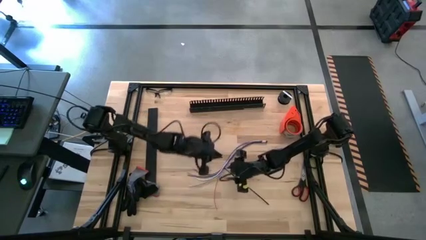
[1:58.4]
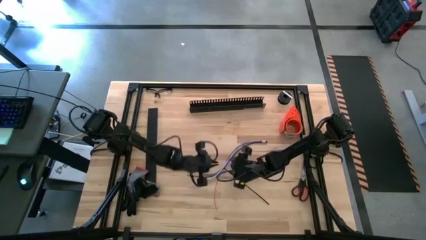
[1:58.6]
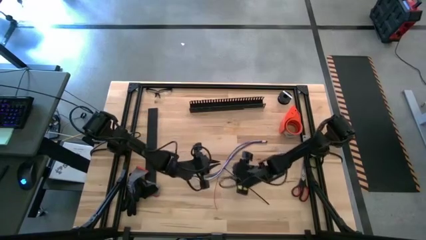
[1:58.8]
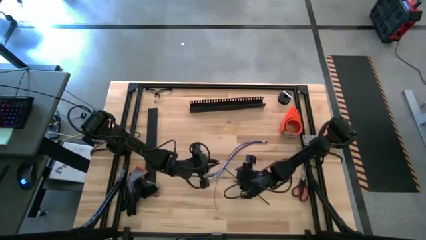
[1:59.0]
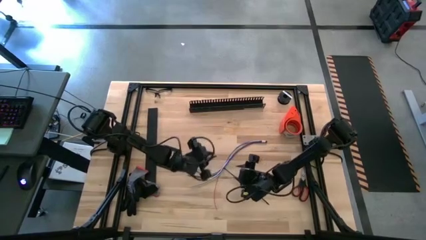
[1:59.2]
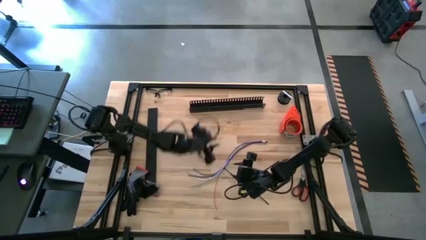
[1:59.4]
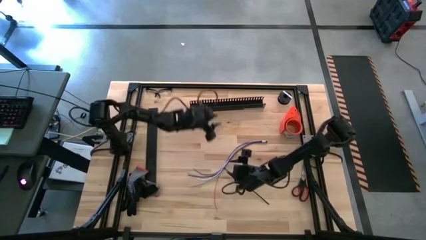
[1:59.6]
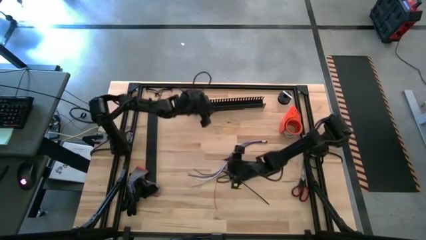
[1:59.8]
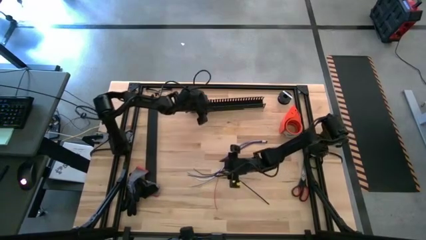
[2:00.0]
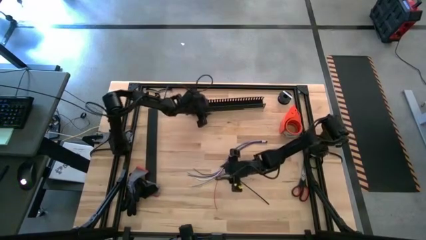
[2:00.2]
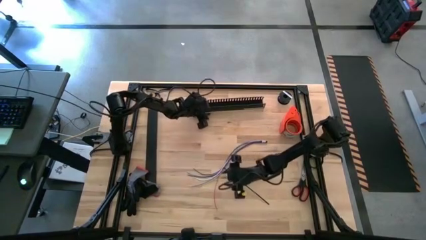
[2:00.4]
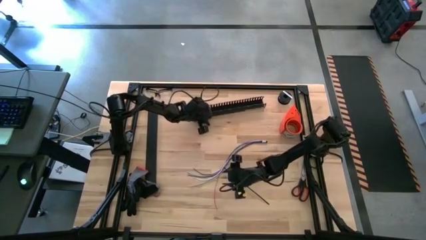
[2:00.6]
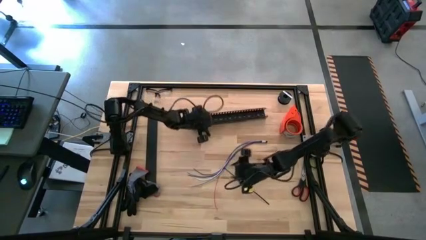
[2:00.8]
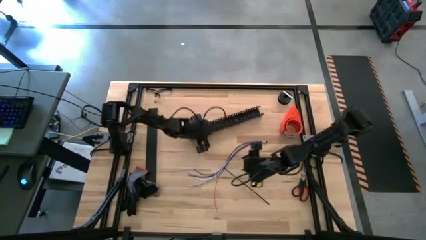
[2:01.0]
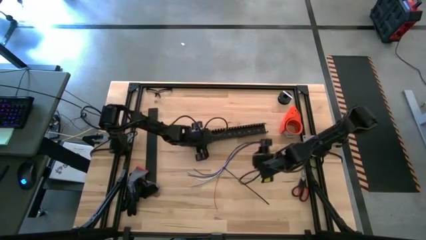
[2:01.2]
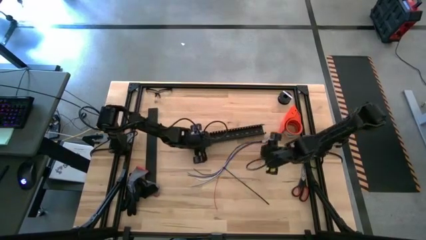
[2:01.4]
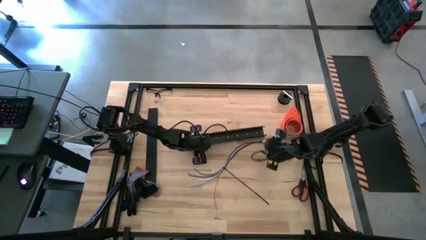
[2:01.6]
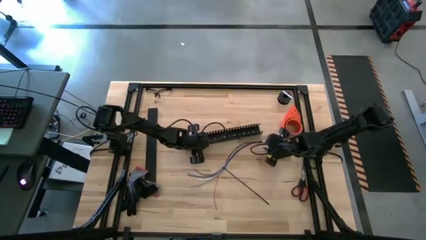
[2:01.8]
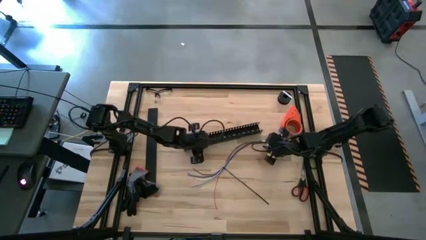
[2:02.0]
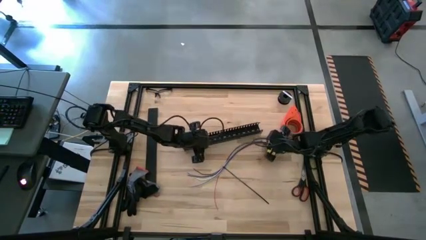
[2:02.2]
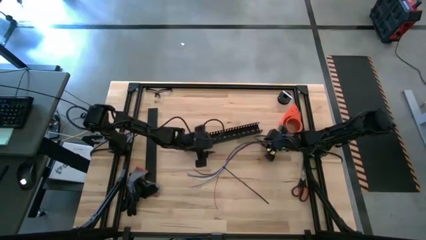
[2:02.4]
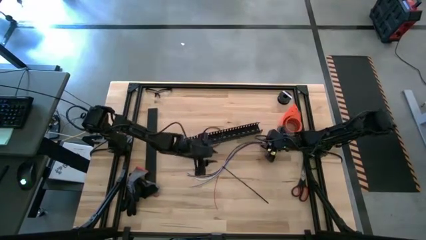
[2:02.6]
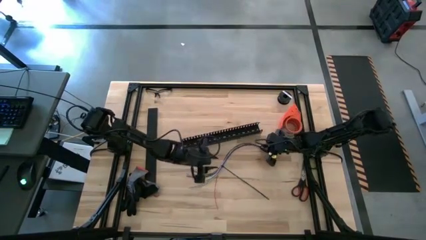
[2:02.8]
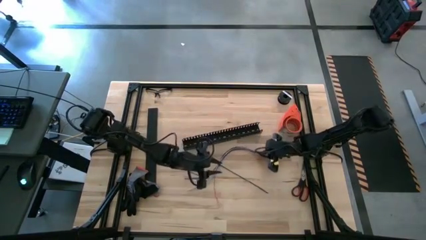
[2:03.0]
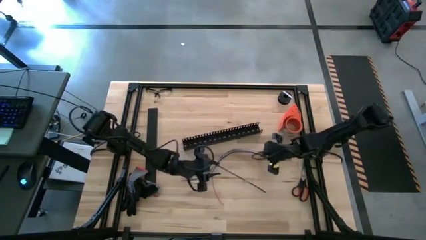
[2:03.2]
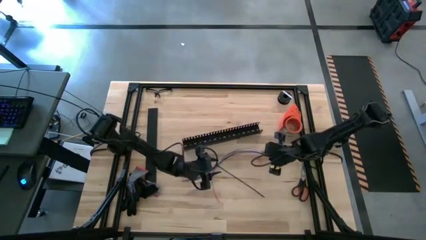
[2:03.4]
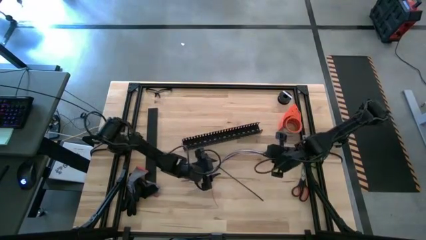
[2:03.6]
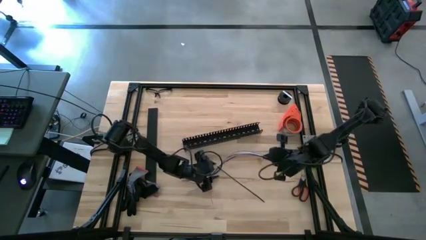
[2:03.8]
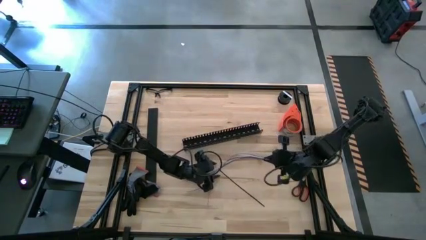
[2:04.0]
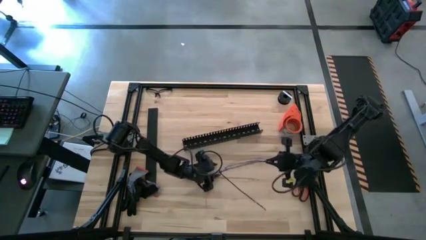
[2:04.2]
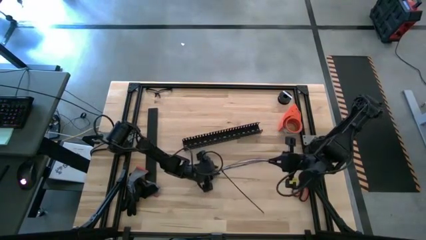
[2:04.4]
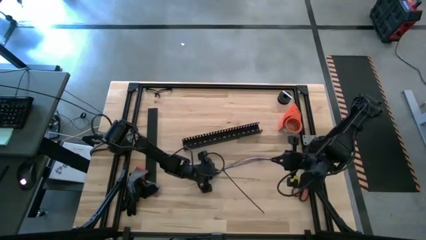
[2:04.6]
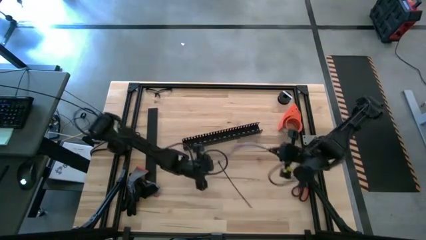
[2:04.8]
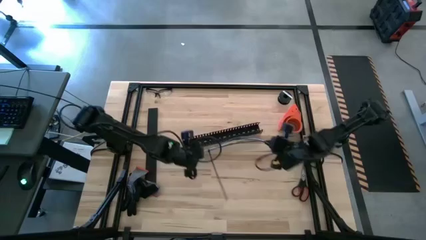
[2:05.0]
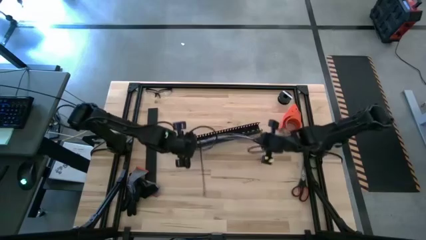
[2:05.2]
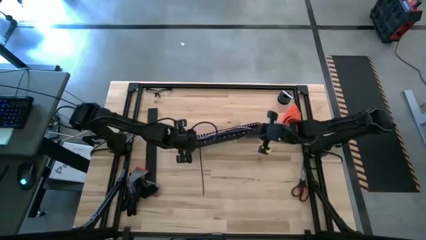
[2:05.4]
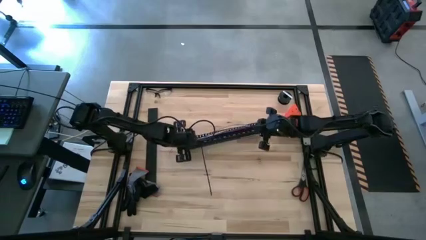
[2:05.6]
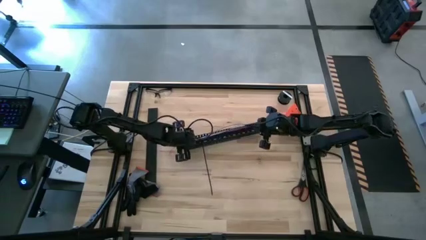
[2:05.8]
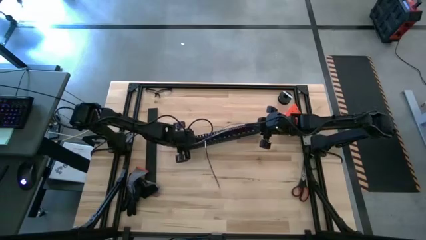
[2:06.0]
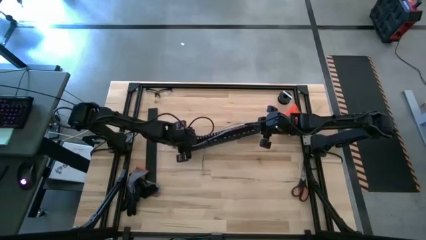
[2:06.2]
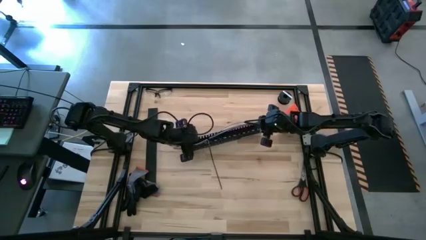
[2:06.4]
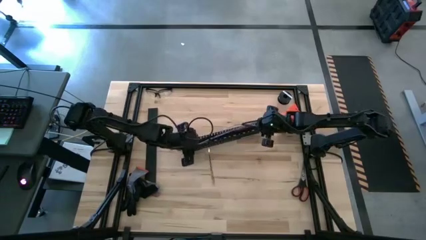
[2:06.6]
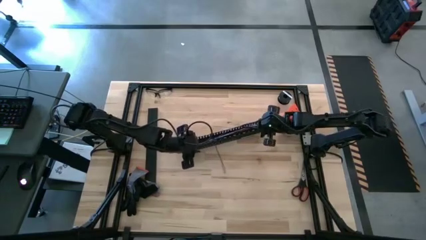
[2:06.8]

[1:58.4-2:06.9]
Task: Ziptie cables
Put the cable wires into the black cable duct

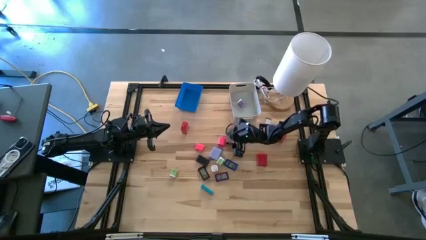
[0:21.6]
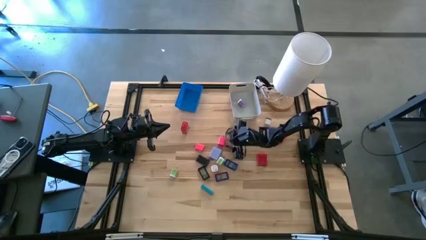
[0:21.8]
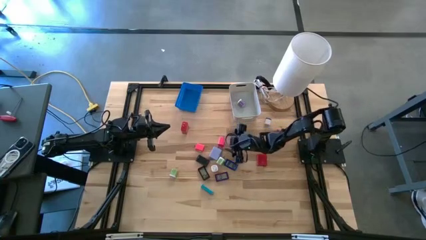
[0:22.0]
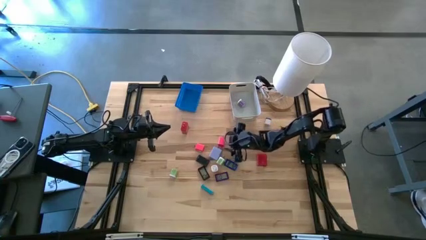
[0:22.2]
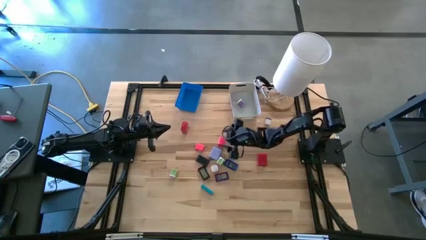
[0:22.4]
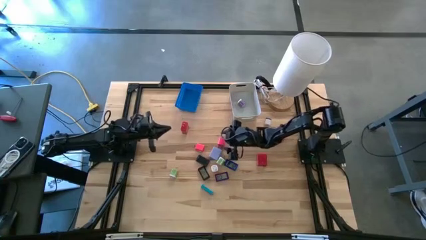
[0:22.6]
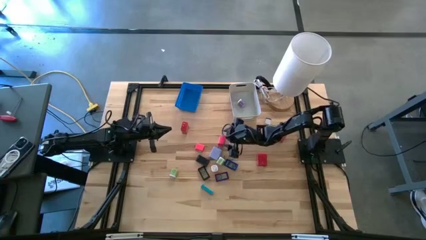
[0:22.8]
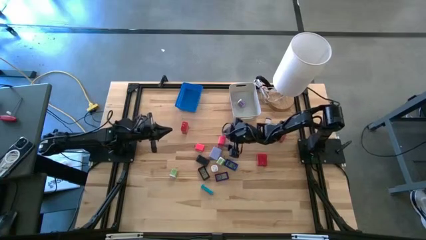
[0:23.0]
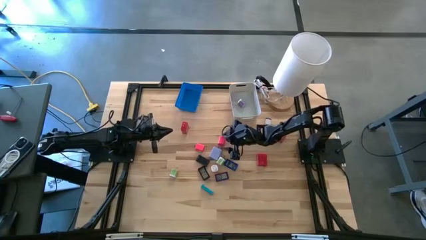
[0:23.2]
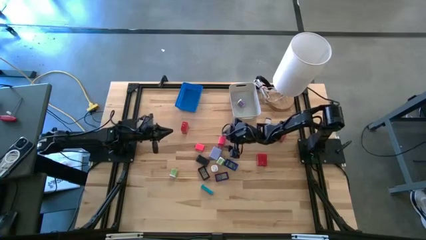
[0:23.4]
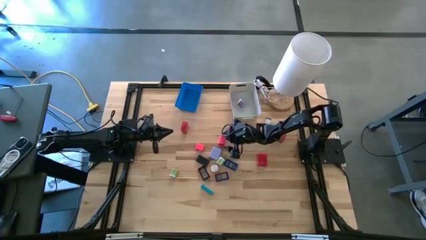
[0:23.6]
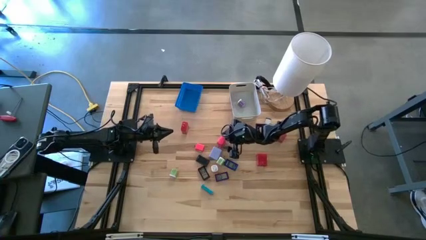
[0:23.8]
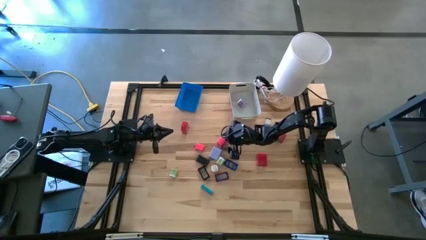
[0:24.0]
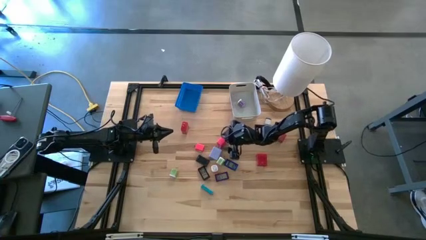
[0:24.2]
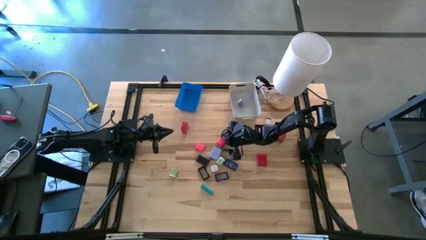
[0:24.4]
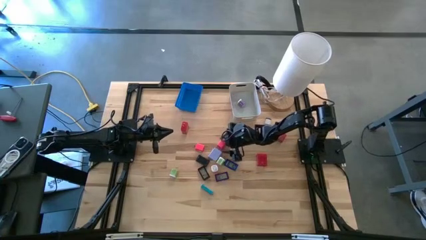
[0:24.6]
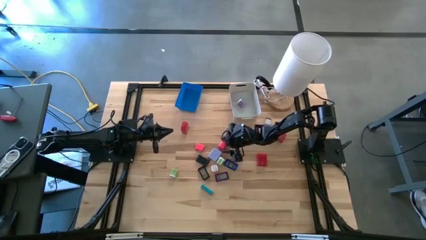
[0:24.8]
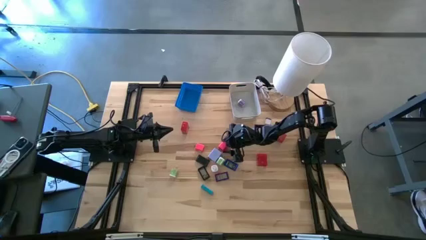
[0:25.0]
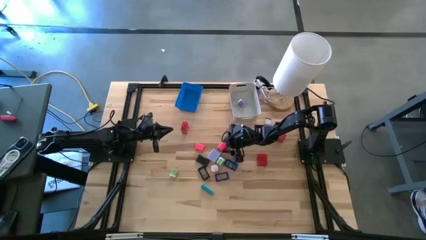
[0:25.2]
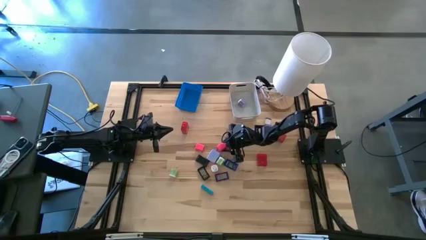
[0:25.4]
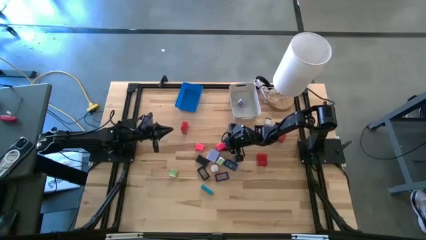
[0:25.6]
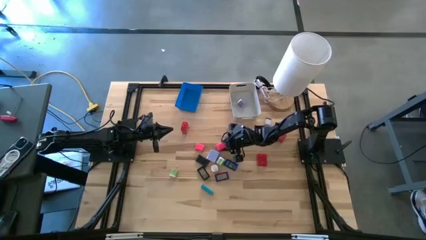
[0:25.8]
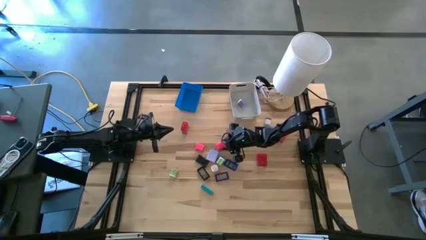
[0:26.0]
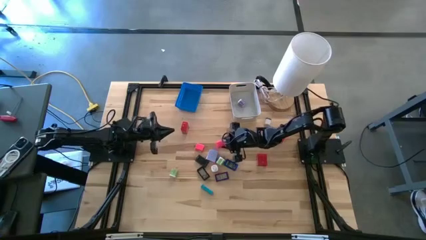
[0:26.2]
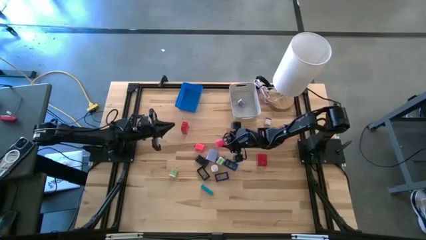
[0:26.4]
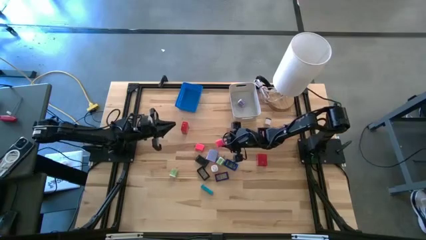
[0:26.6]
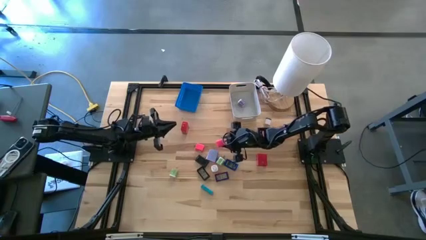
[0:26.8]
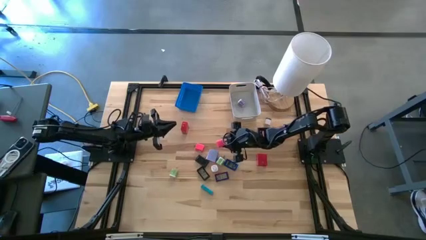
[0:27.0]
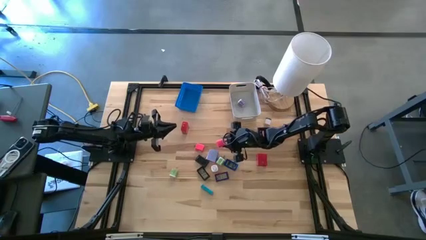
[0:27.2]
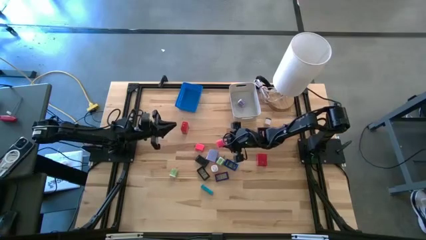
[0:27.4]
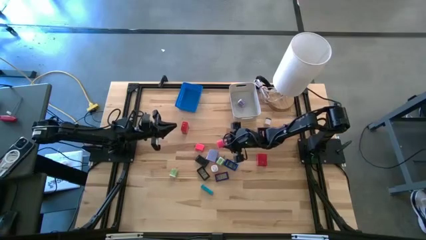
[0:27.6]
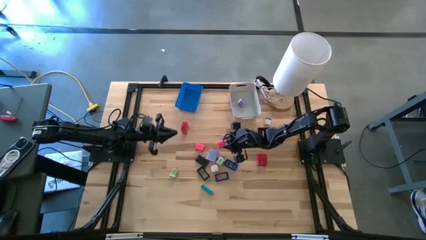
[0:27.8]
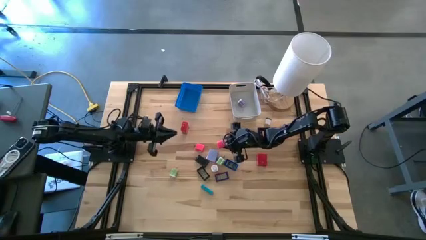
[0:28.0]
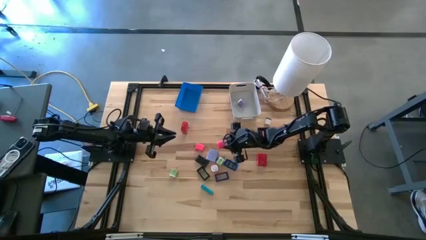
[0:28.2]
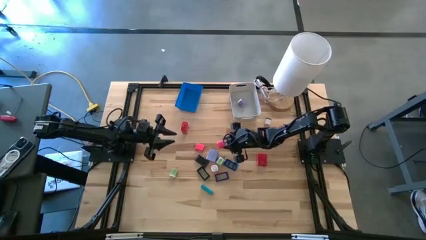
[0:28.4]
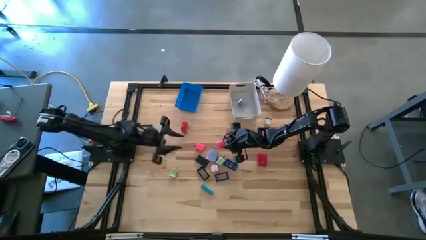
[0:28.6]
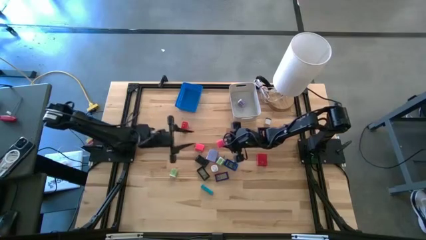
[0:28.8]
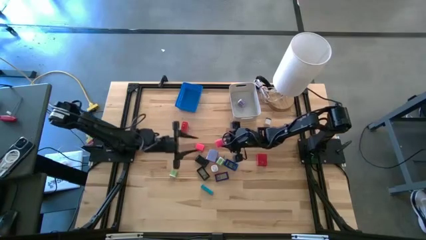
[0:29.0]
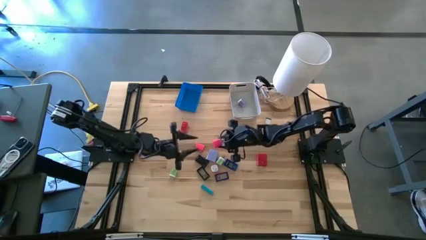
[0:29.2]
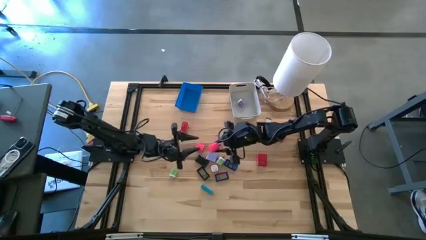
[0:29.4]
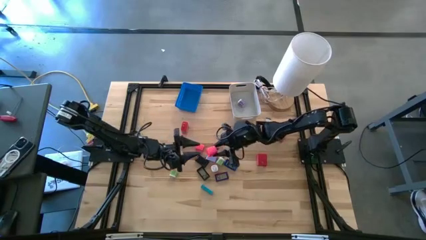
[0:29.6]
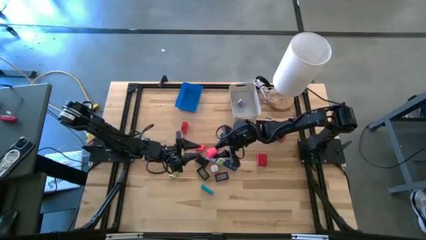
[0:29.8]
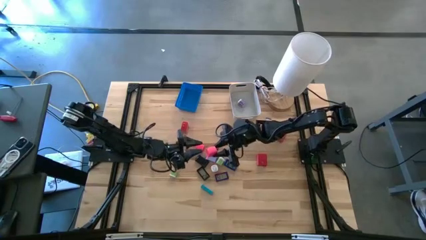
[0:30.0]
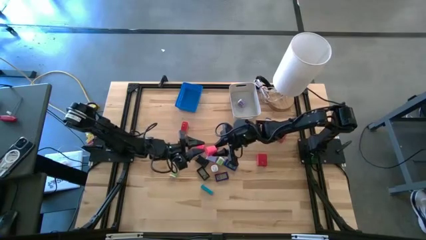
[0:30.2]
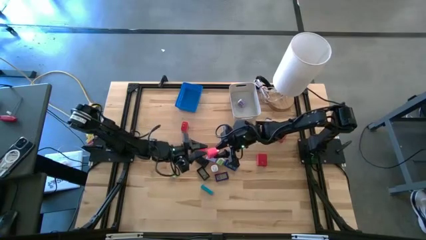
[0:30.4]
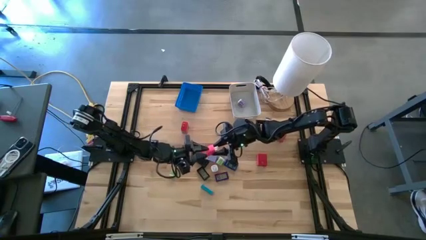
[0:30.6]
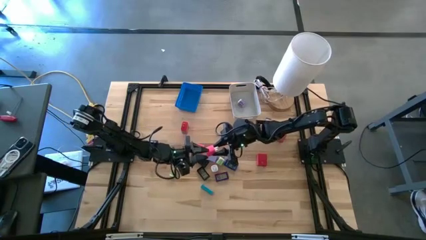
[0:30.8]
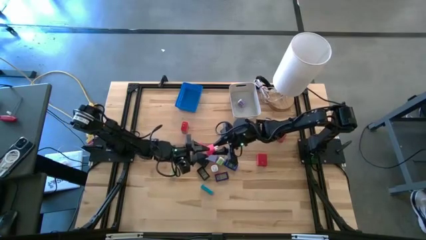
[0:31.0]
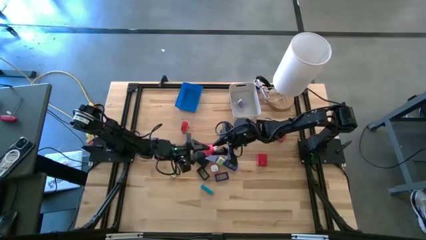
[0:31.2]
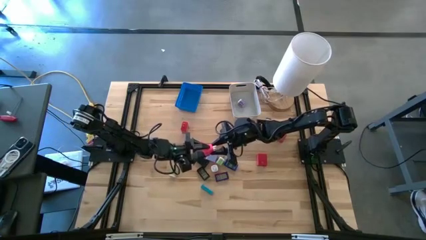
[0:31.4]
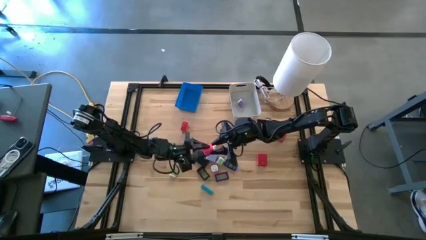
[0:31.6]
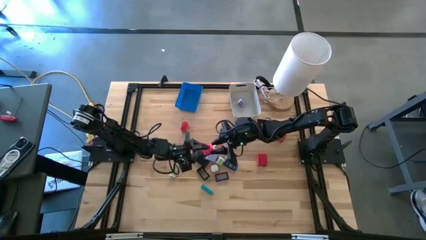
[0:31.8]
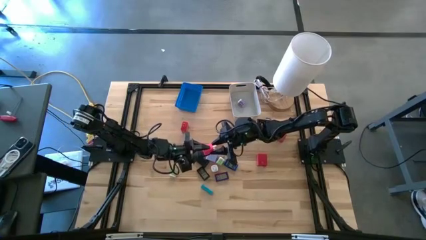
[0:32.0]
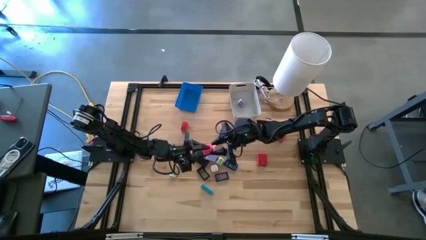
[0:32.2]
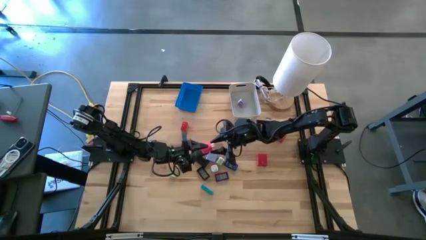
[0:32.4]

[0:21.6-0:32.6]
Task: Pick & Place Office items
Put the right pink charger adapter into the white bin
